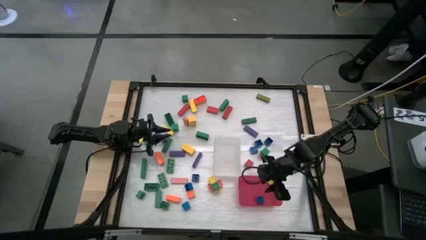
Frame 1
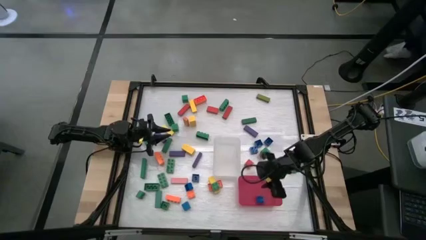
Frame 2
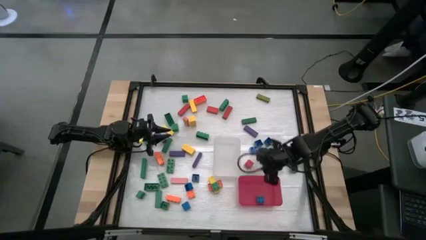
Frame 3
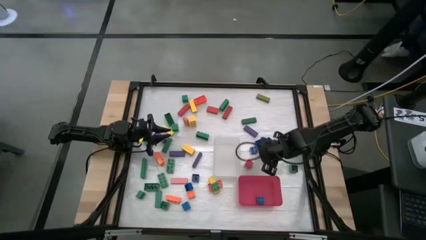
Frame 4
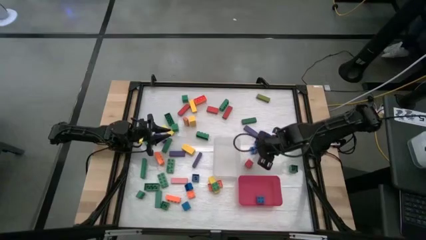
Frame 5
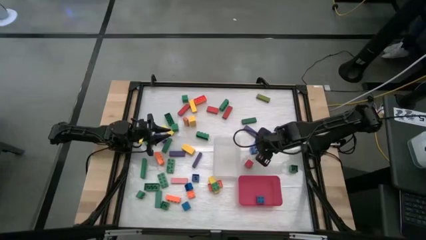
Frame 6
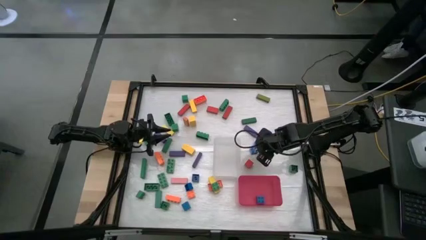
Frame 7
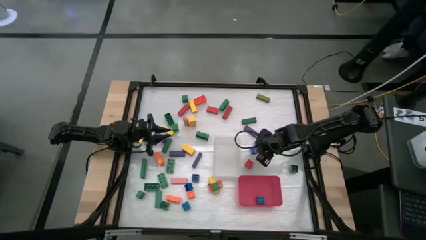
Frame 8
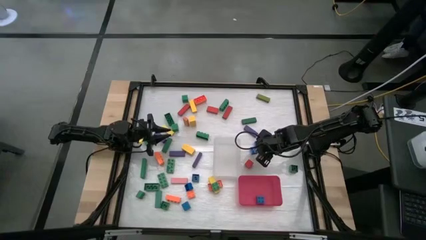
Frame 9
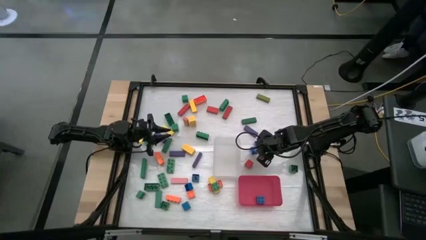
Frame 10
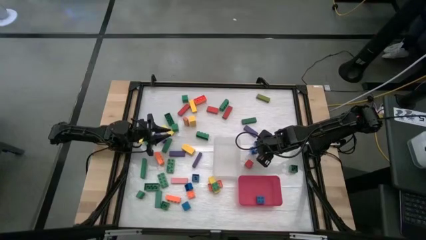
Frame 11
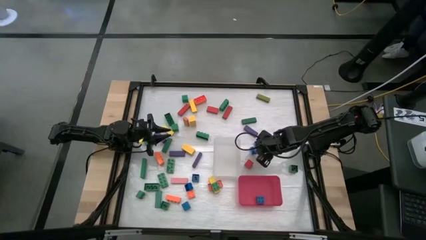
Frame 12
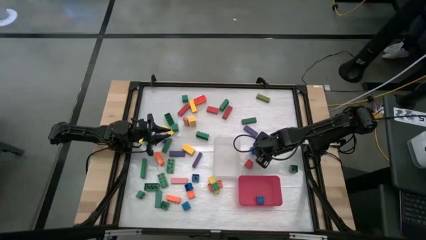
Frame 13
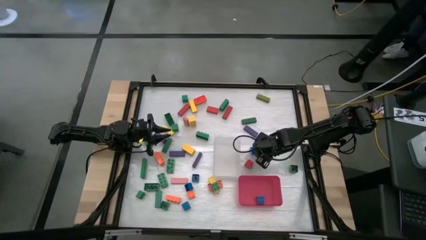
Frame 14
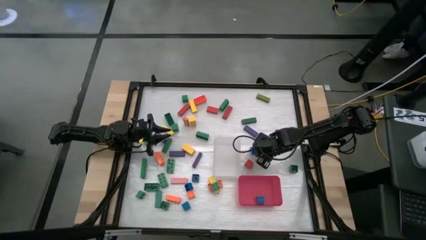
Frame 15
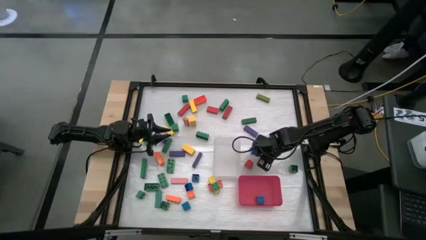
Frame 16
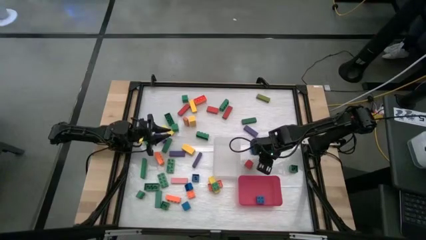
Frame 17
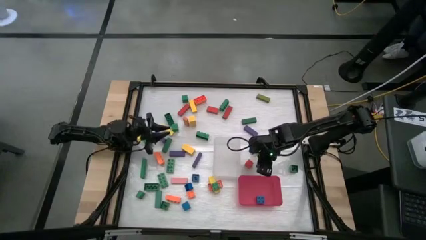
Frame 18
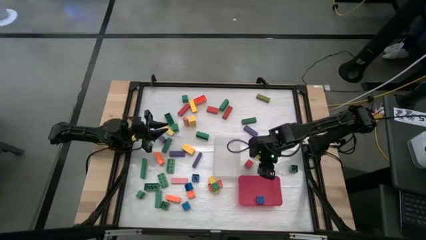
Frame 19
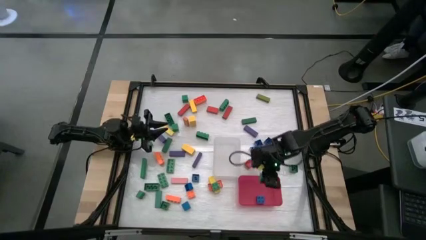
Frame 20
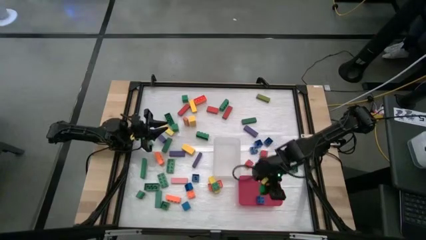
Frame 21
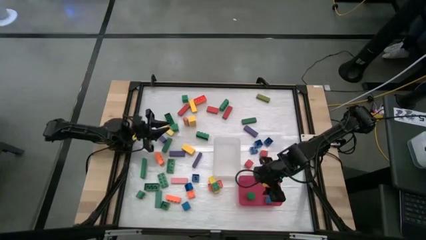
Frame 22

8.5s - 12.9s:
Task: Sort blocks by size
Put the green square block into the red bin

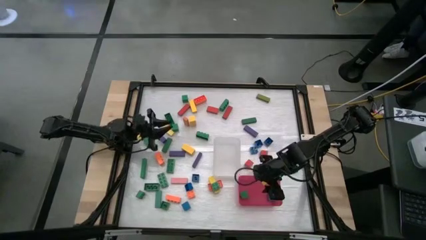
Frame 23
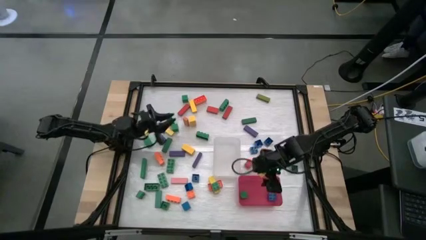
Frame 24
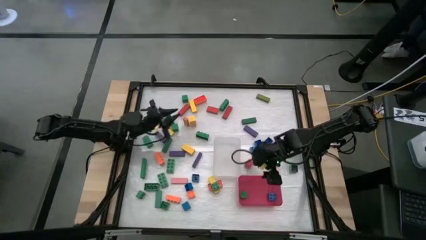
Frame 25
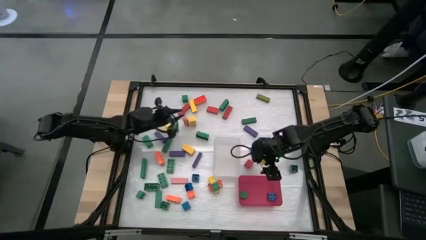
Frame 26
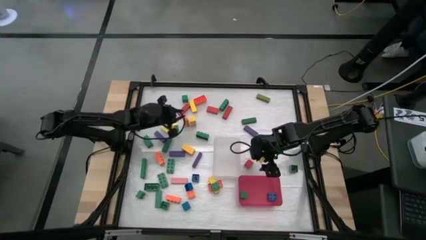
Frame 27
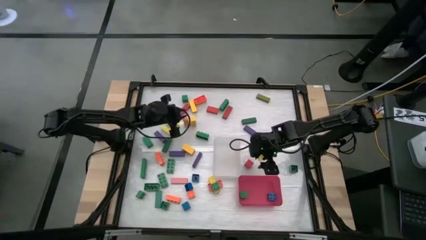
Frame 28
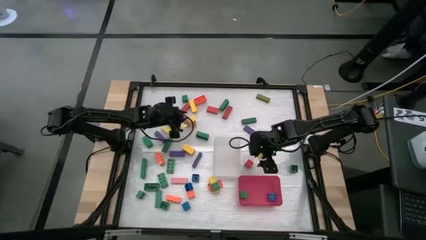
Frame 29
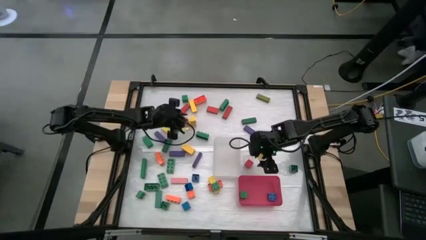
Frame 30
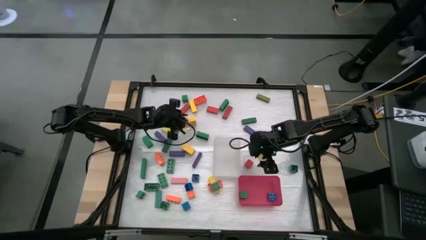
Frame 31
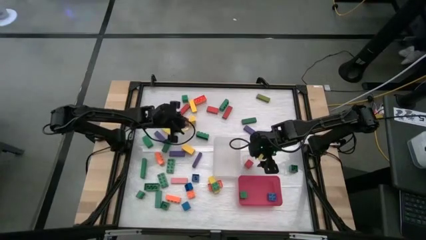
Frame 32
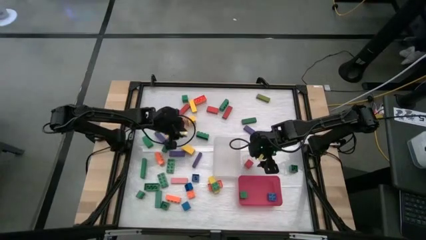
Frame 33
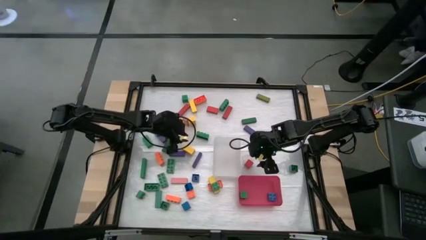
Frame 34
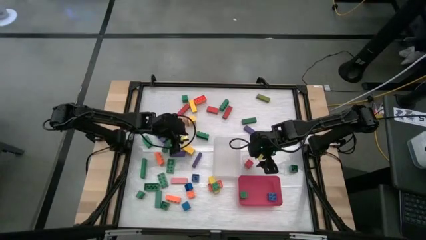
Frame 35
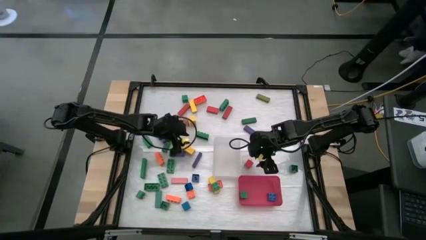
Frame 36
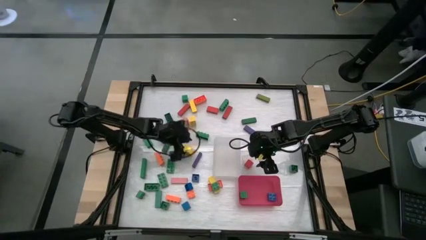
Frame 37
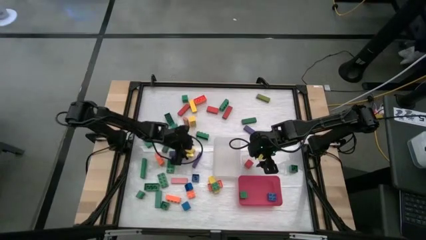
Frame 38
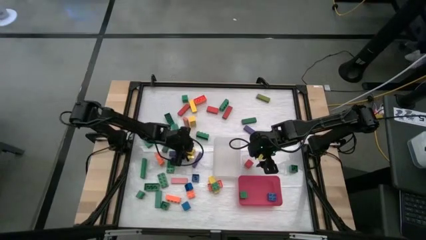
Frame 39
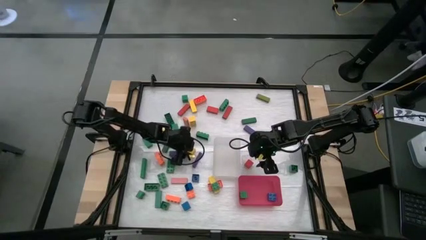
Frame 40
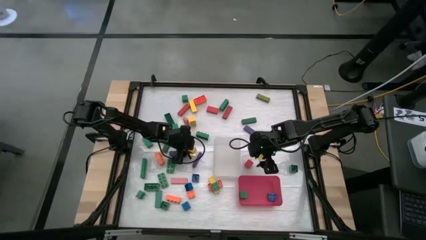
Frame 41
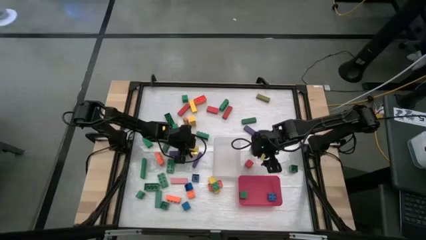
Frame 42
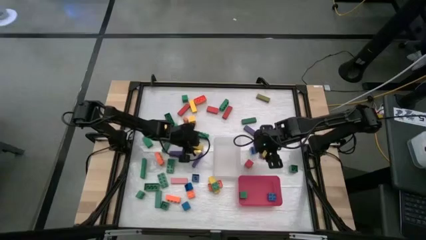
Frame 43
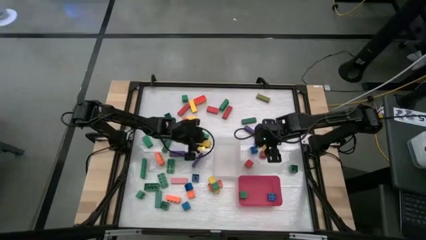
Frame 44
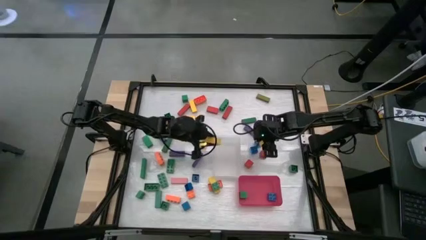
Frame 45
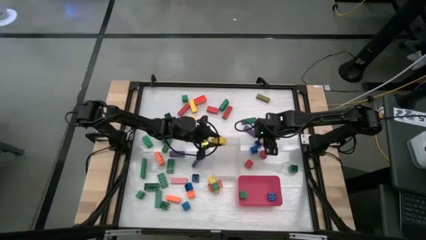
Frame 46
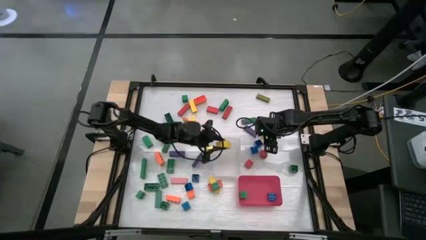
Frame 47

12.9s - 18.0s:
Put the yellow rectangular block into the transparent bin

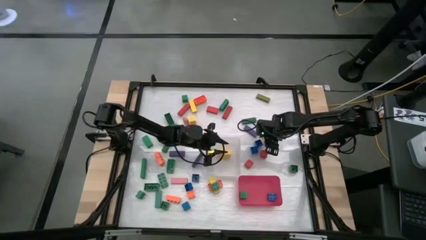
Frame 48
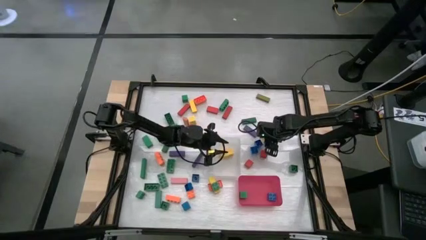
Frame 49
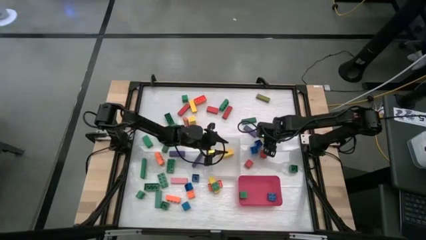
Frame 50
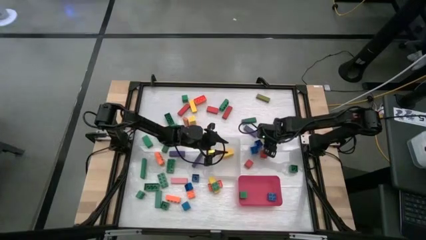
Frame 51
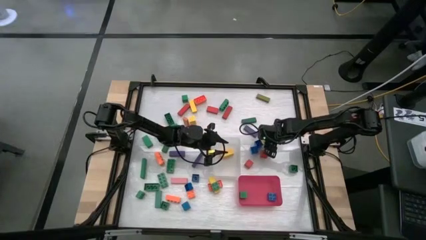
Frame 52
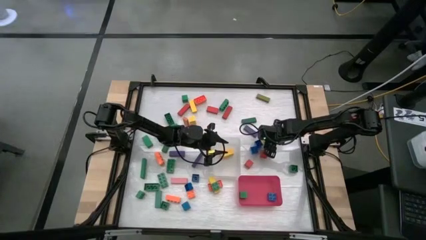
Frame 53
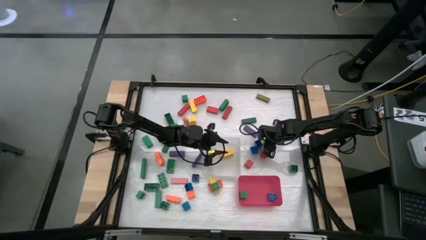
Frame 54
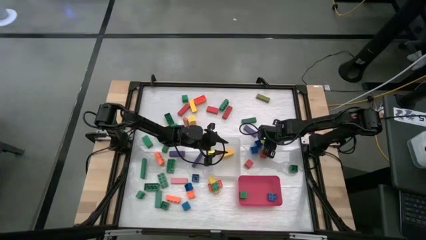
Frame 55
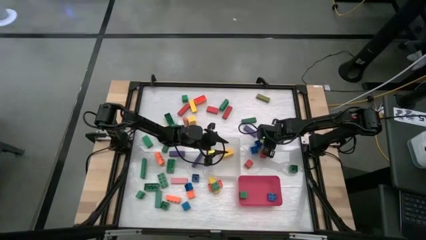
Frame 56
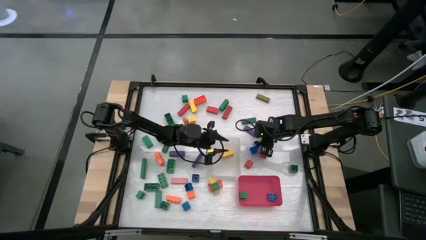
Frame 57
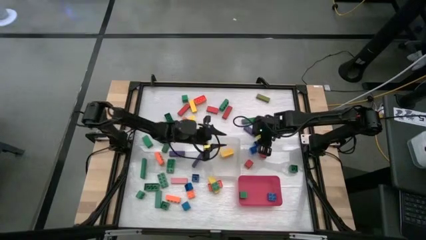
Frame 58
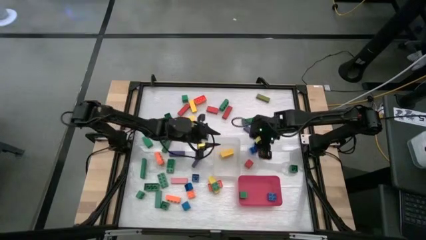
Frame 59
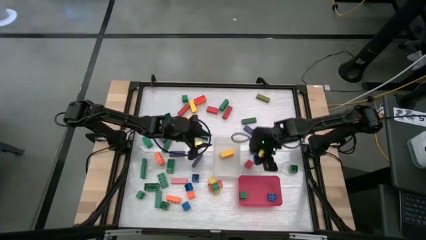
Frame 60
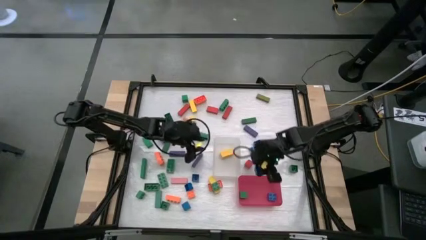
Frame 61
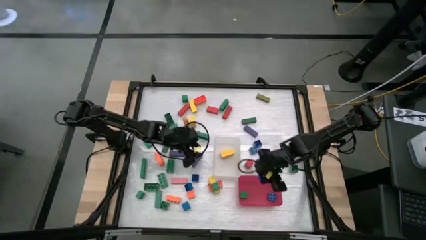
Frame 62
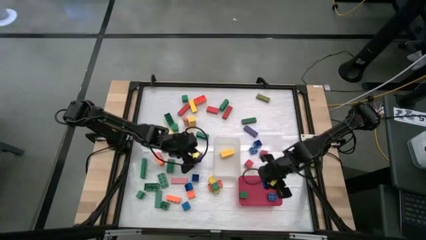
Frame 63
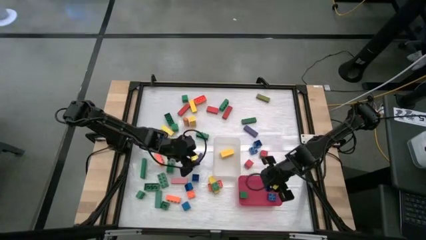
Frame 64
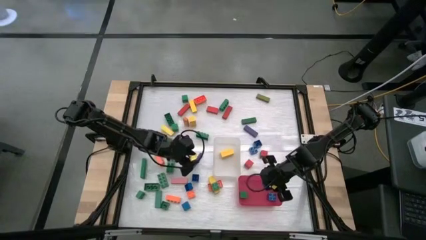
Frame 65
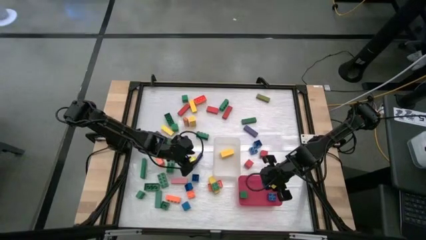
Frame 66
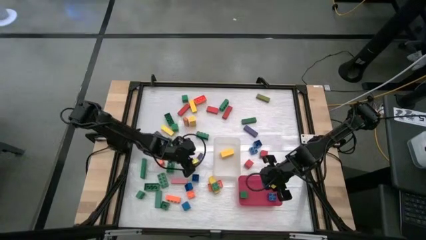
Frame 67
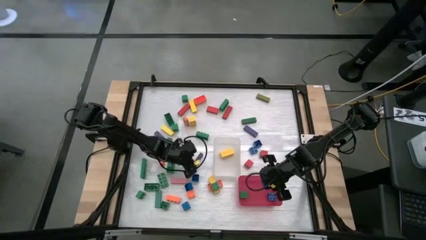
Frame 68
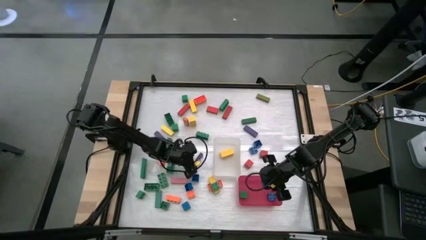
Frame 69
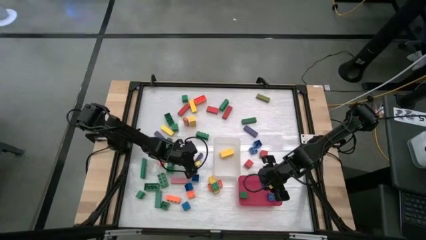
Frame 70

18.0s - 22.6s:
Put the blue square game piece into the red bin

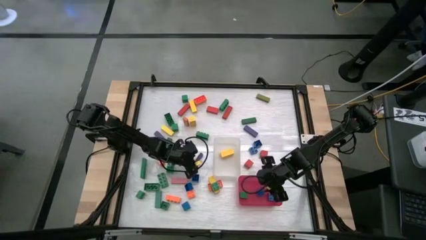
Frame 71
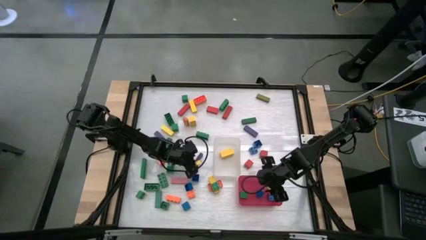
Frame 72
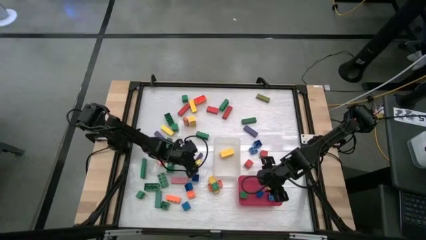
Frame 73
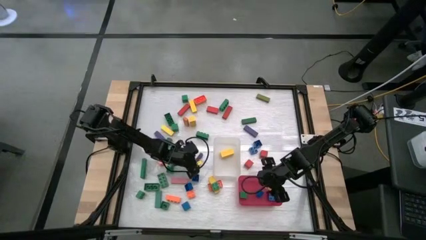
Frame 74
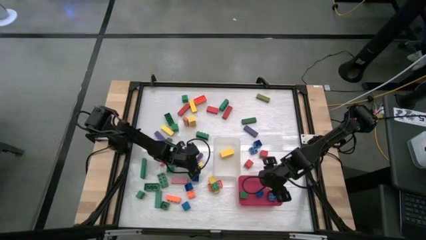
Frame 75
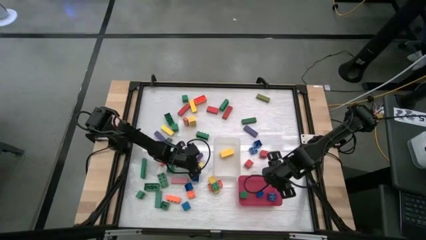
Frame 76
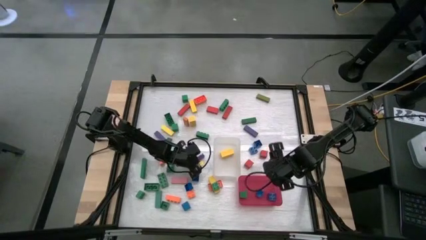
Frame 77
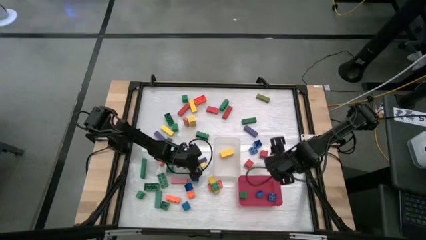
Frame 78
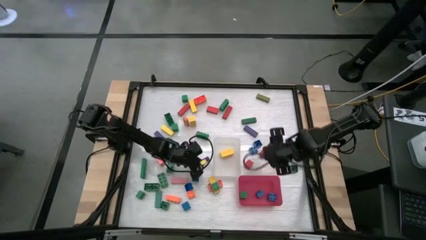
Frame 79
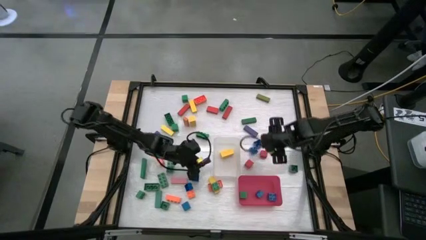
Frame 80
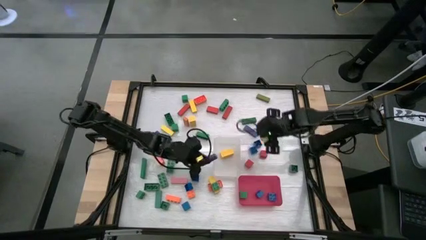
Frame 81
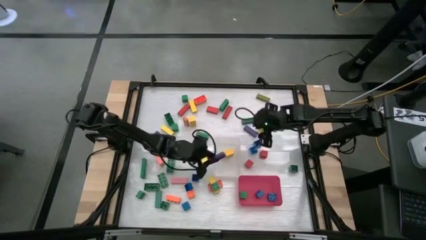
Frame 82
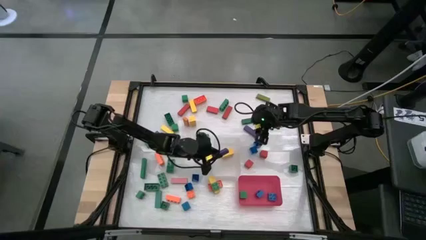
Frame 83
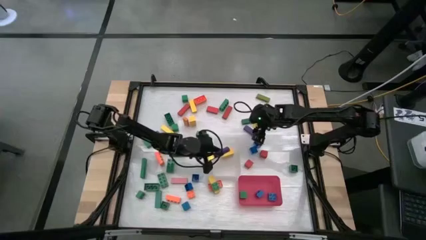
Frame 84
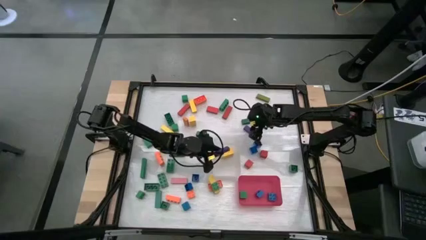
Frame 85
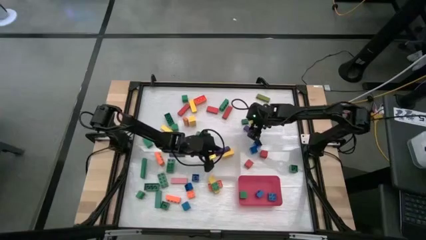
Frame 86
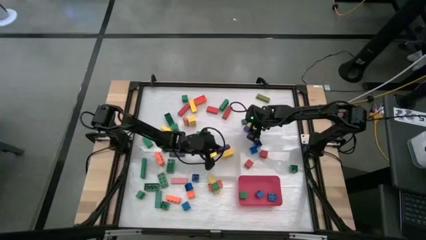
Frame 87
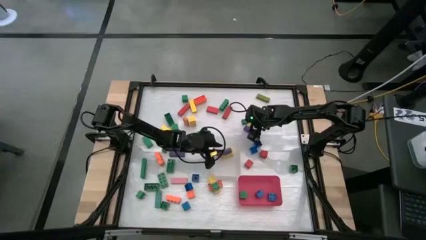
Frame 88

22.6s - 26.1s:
Put the purple rectangular block into the transparent bin
